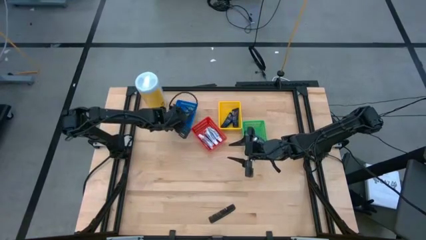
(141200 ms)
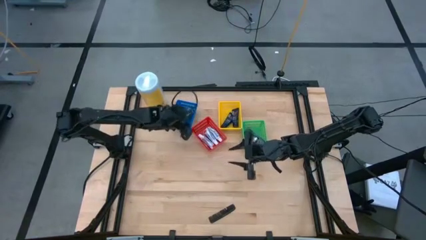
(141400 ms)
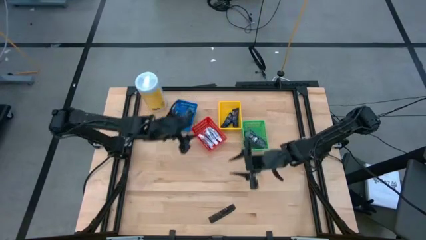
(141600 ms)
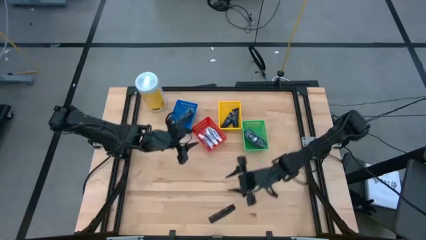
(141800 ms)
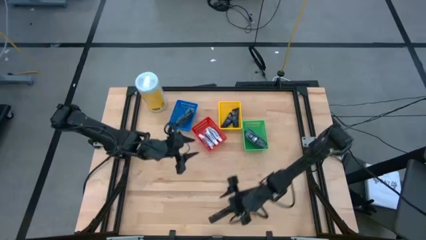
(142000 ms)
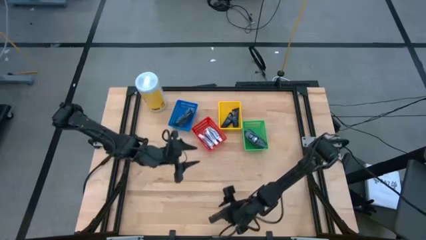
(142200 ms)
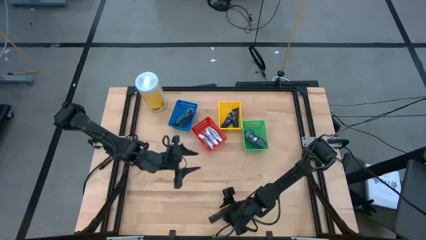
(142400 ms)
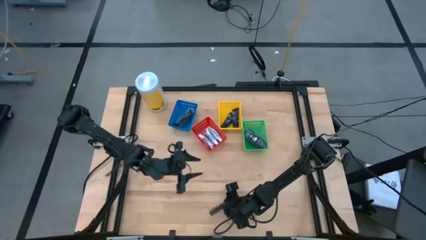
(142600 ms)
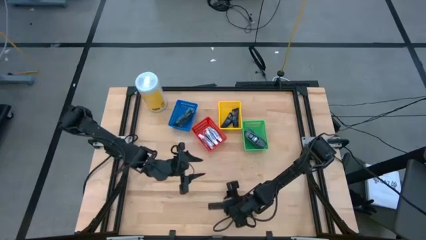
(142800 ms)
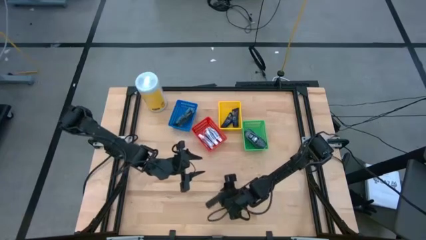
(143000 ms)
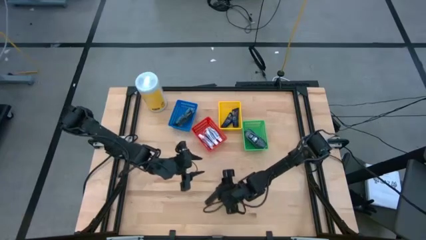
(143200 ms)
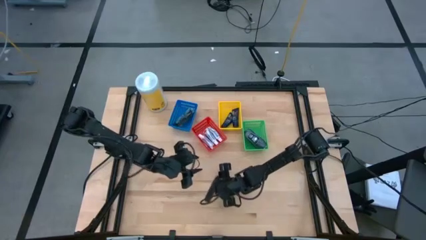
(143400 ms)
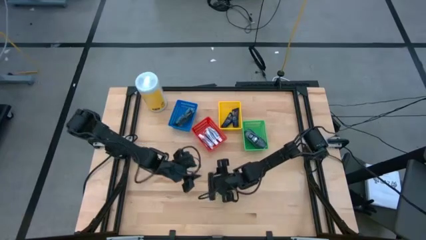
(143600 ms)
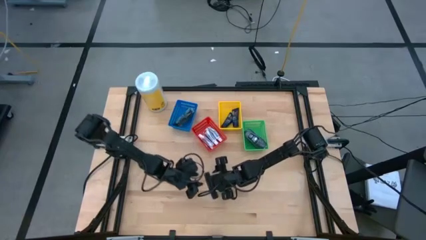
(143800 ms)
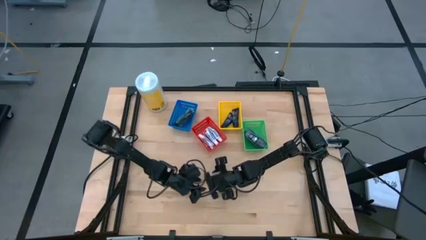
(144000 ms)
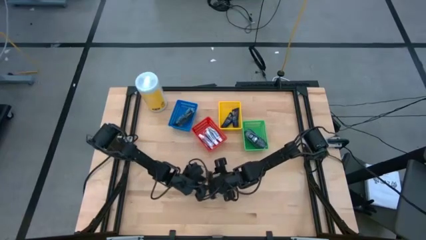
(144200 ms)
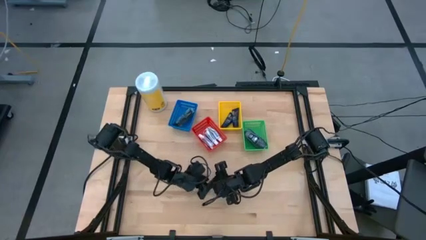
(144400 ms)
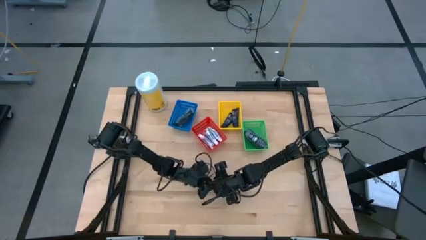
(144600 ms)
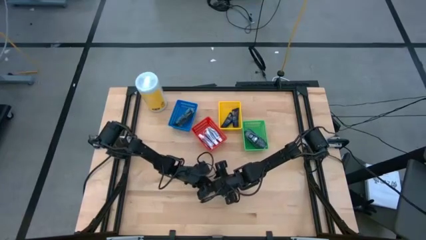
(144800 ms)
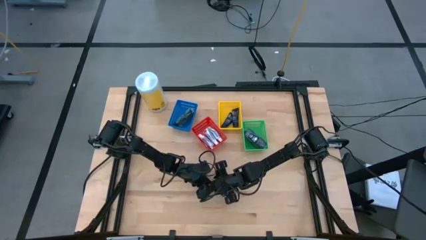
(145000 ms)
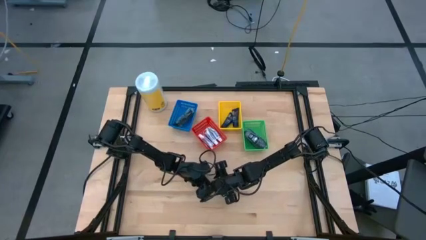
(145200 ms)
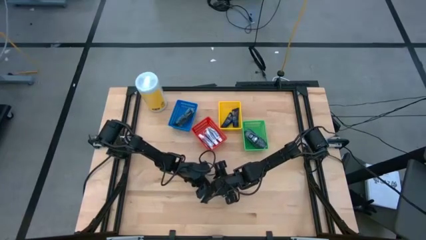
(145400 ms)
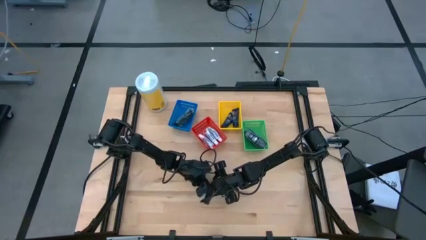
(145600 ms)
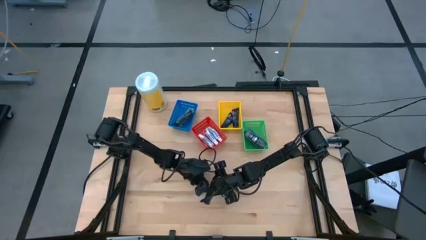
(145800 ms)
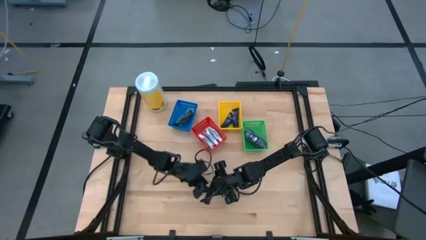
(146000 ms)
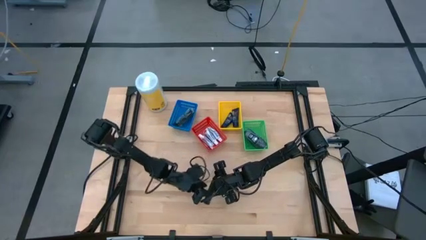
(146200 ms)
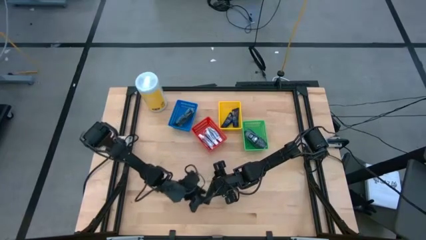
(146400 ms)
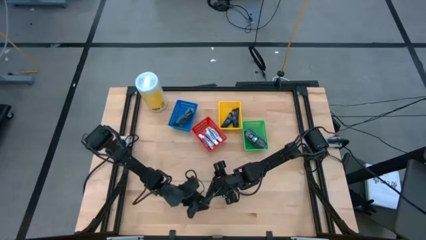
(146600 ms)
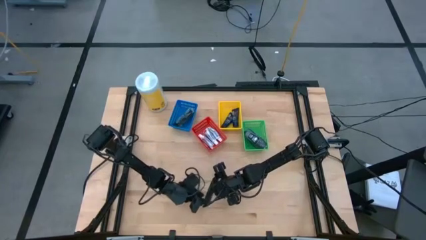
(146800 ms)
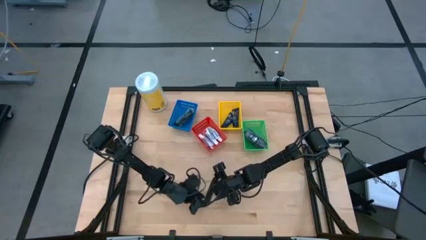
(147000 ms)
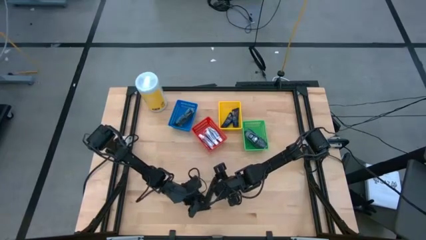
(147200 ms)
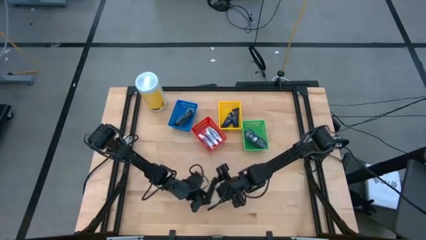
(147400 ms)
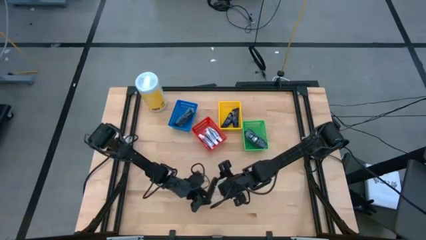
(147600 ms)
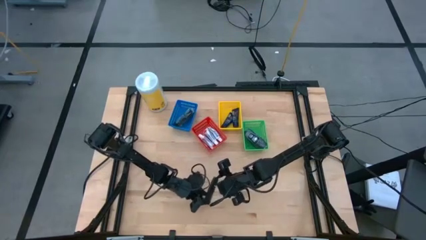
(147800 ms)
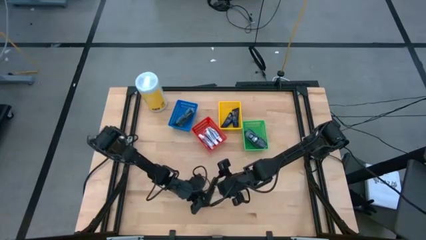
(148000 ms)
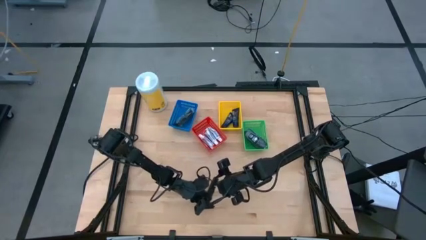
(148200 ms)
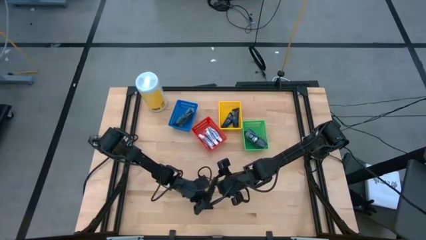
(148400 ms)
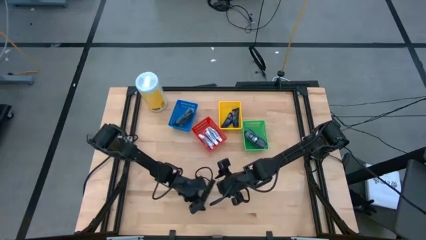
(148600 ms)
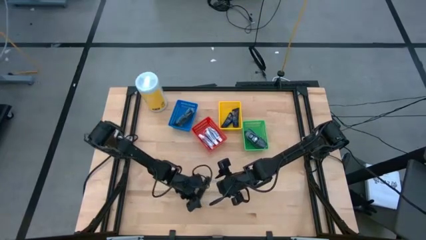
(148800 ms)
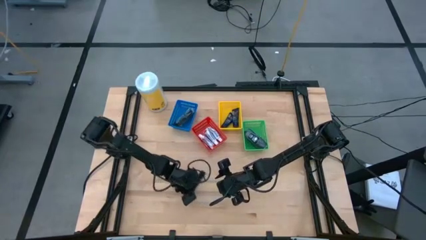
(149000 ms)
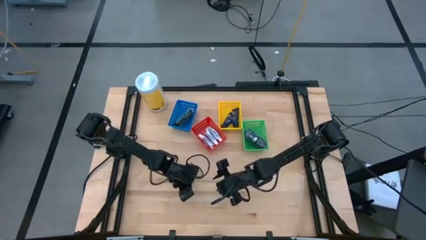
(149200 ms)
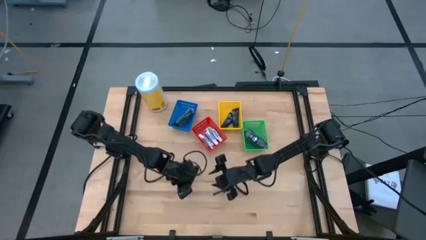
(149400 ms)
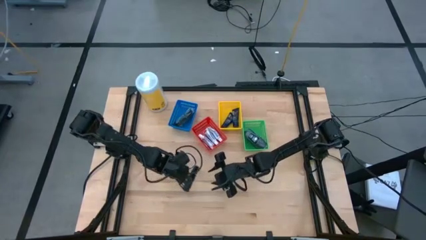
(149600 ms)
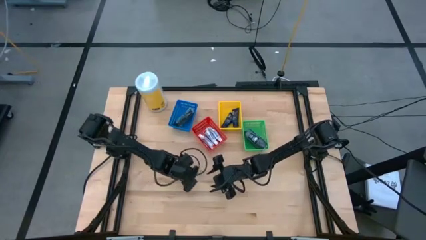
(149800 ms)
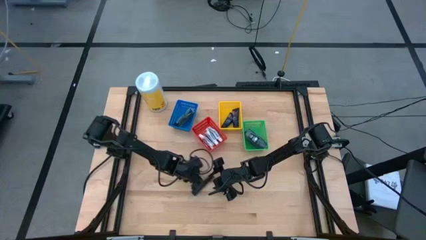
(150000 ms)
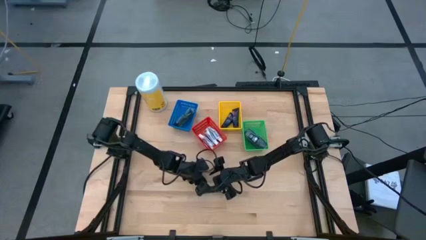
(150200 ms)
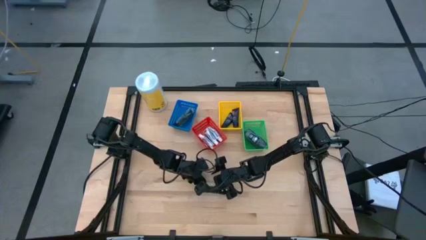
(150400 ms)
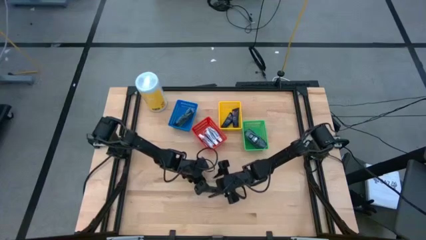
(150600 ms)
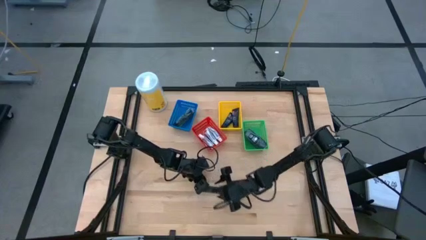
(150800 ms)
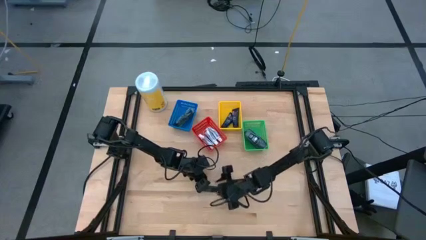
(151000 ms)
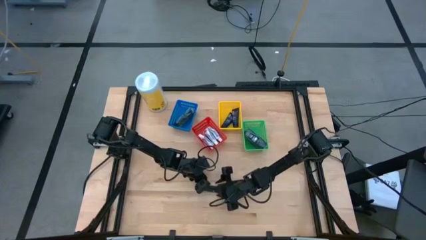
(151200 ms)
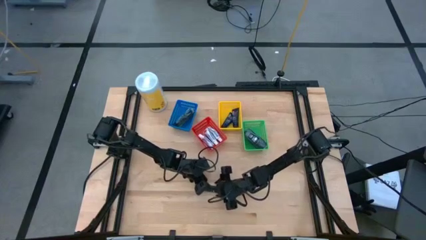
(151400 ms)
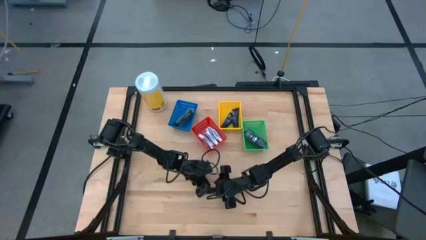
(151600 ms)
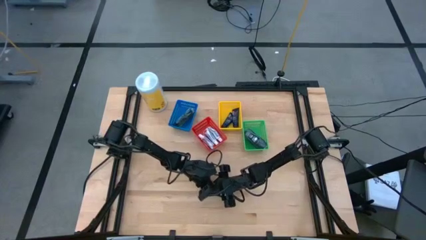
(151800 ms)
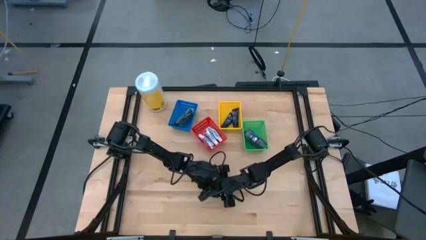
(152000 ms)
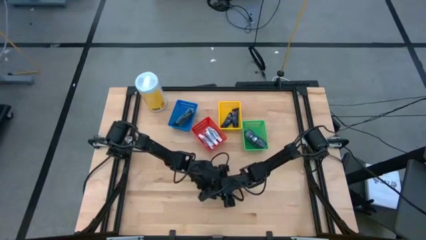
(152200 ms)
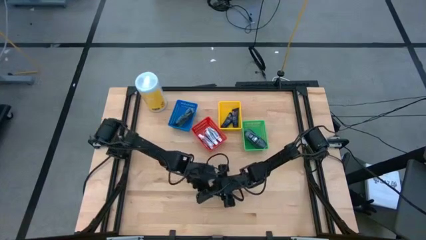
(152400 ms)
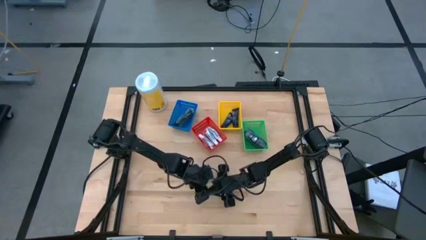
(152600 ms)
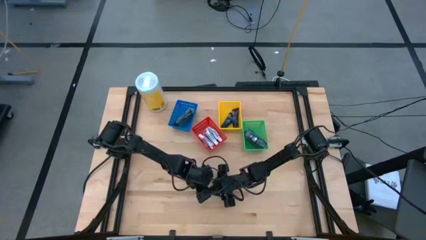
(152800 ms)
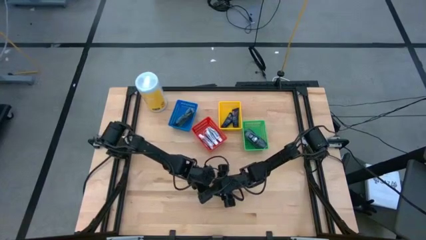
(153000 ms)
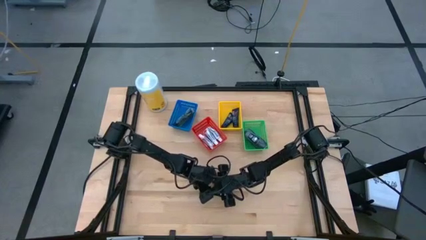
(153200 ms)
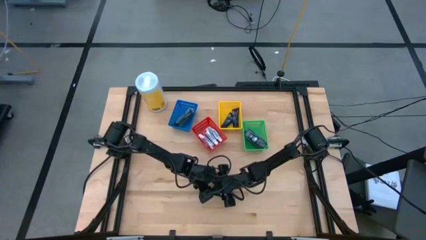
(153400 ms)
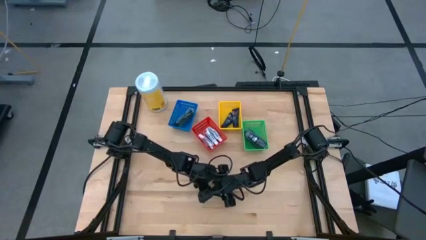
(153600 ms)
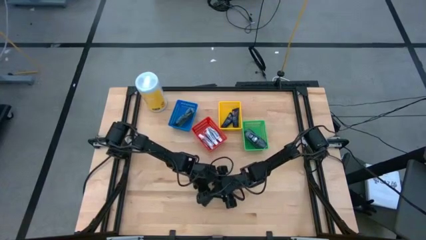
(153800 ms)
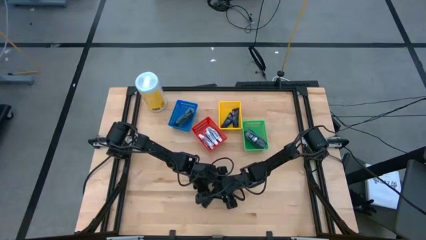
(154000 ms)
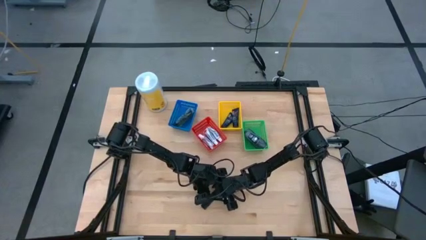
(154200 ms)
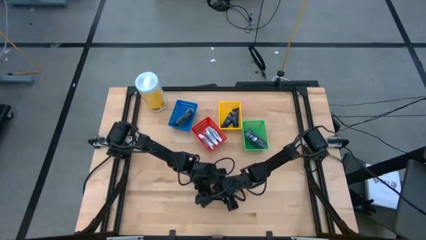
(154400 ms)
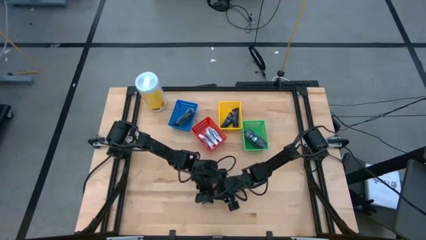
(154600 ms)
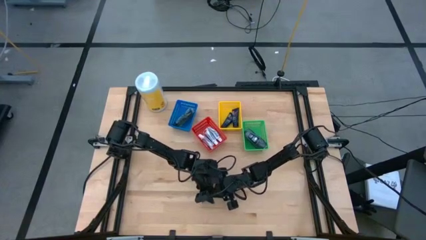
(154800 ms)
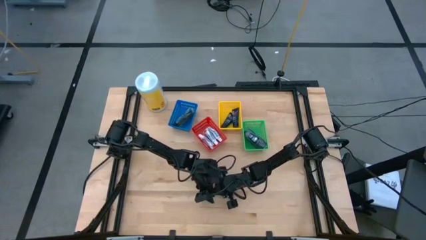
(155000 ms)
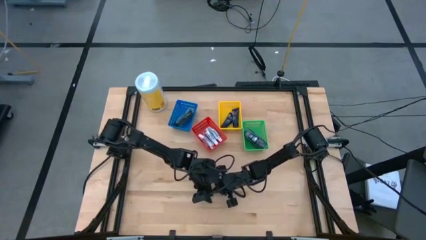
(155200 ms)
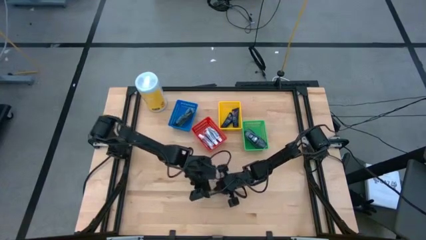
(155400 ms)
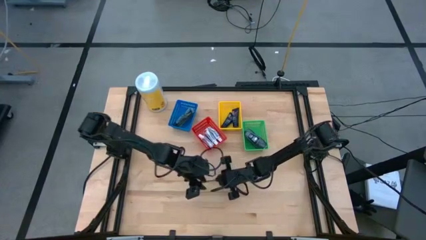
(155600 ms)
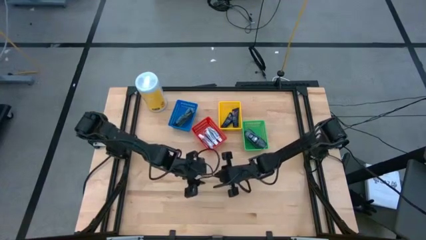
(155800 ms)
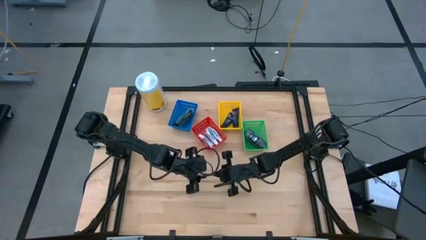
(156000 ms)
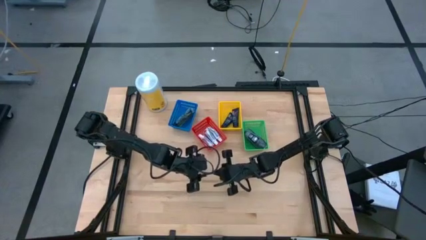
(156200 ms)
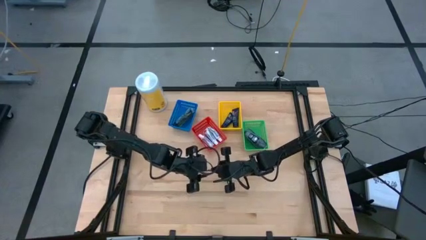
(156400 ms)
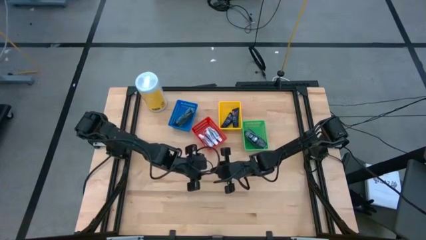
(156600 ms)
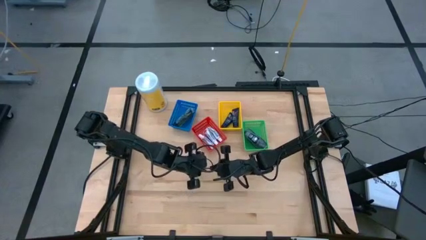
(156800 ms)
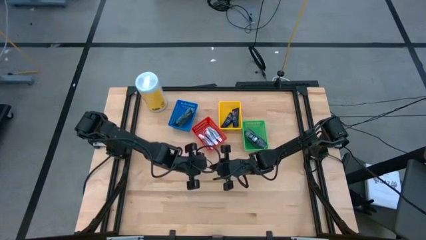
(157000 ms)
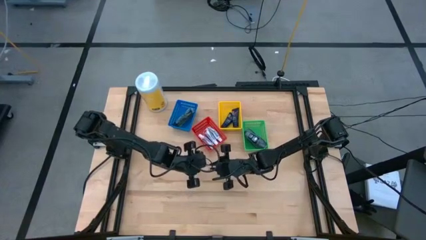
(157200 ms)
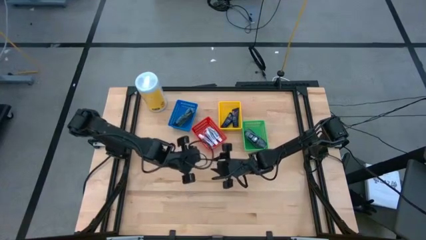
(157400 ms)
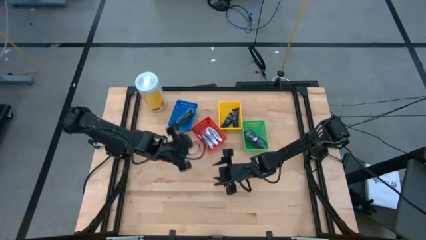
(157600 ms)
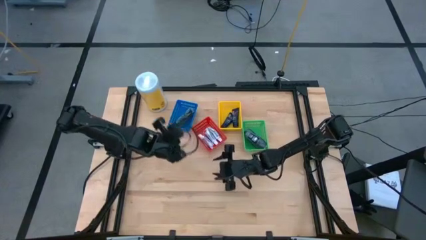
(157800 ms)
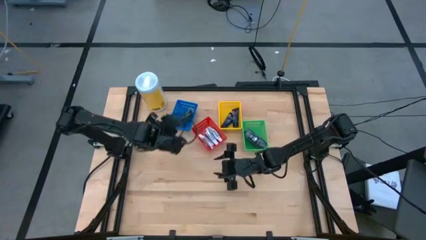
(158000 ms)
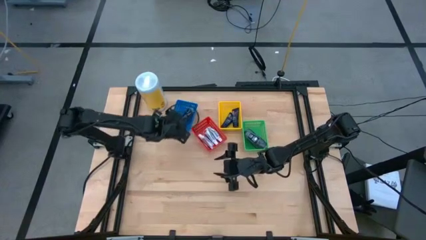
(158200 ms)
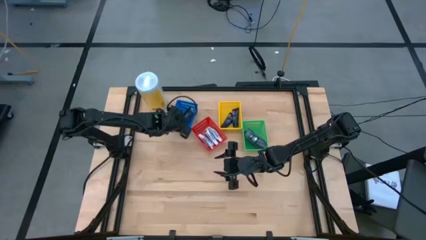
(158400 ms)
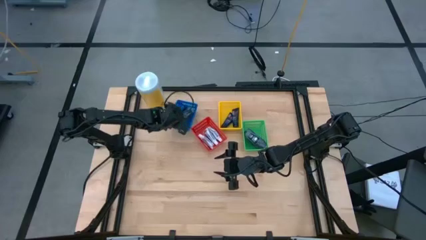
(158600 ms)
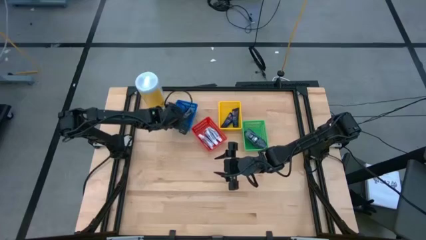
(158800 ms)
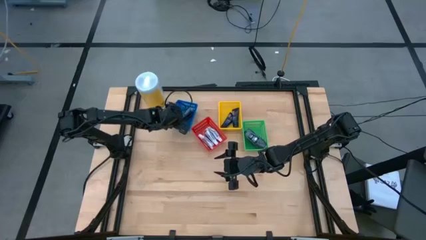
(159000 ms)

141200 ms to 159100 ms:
Task: Pick & Place Travel size toiletries
Put the black comb into the blue bin
